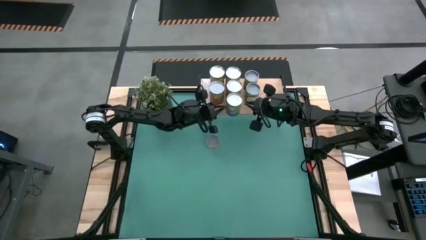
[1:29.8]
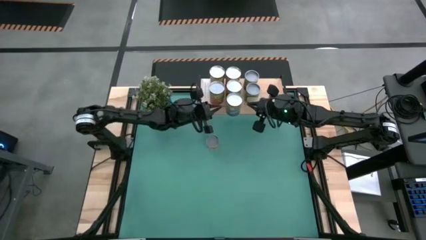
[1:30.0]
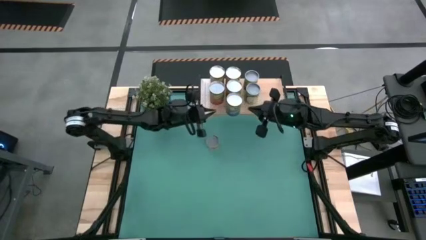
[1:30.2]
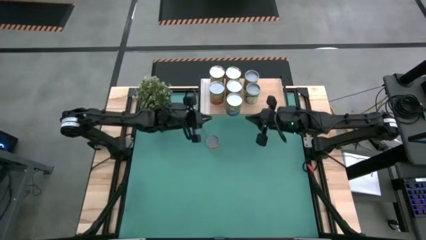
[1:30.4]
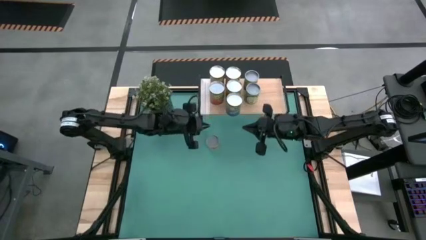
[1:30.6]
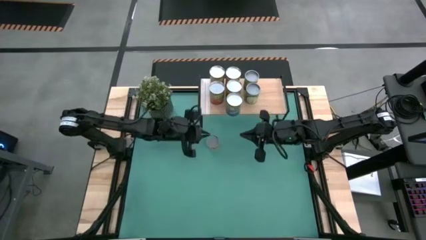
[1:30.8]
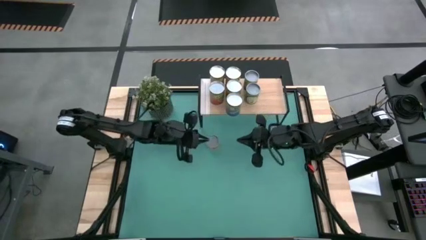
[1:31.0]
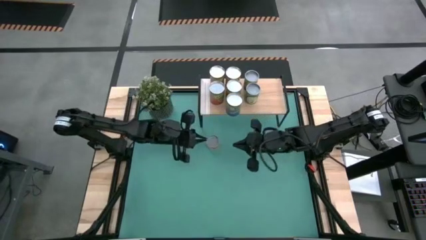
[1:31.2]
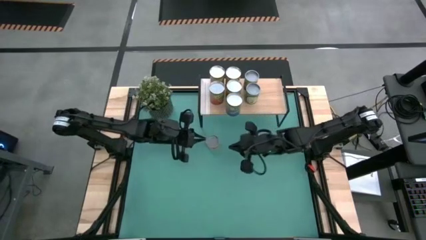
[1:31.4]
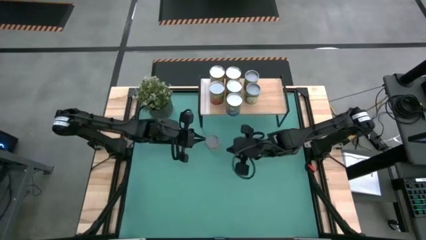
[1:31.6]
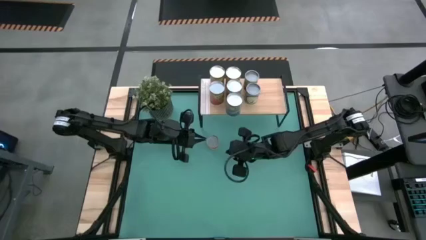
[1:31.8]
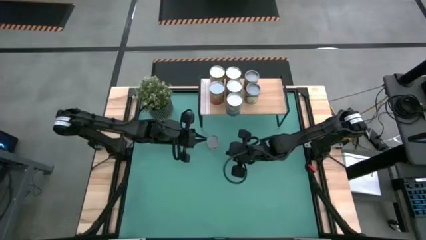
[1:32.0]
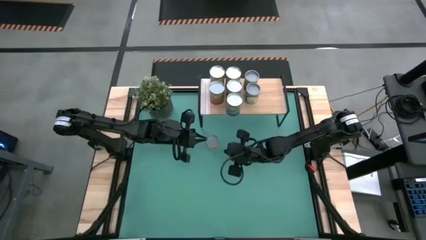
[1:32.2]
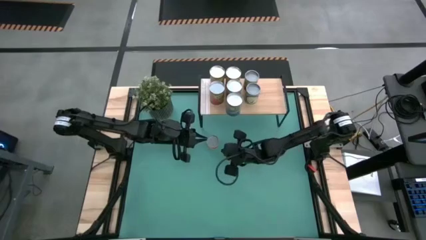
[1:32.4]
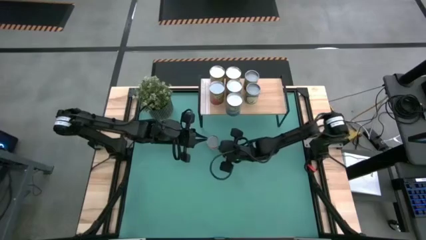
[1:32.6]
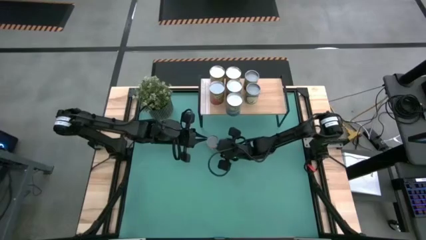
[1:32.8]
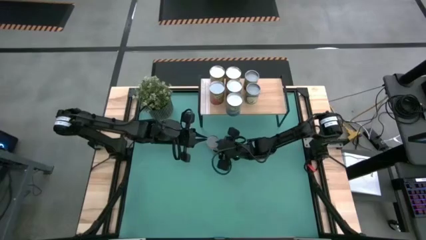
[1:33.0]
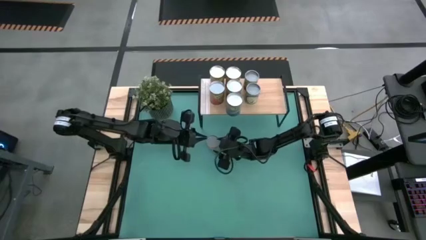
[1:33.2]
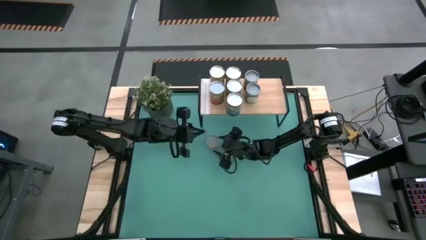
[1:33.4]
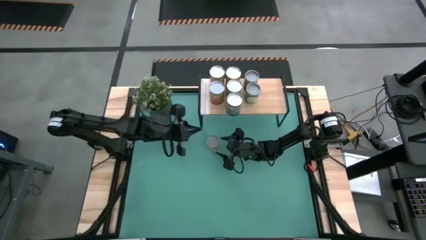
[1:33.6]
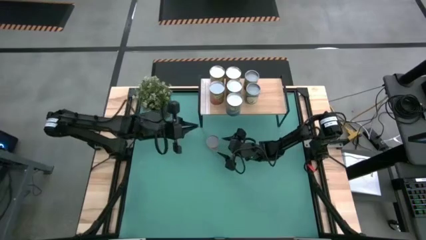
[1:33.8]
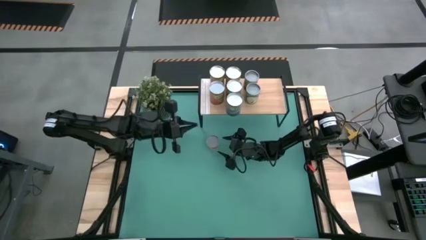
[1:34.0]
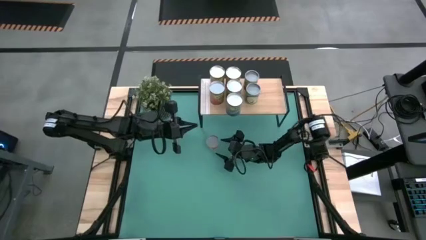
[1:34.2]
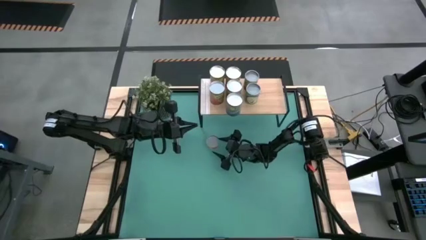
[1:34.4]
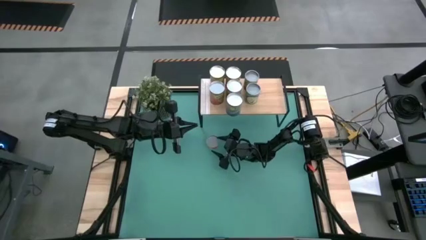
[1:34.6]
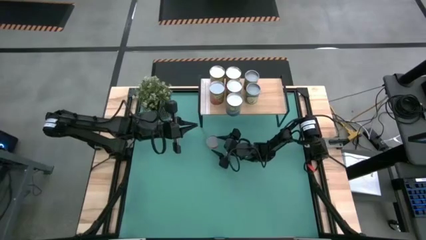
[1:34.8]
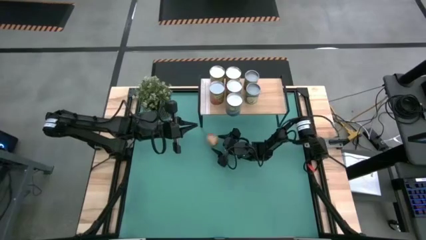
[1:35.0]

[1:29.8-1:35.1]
Task: Pick and place cans onto a shelf
Put the canned pineapple rings on the shelf

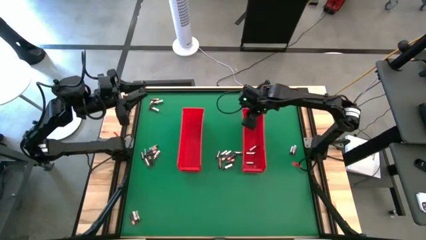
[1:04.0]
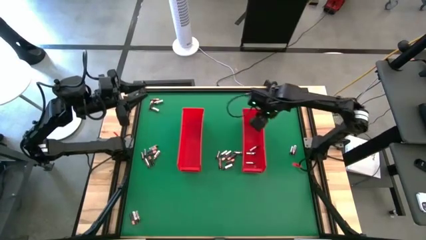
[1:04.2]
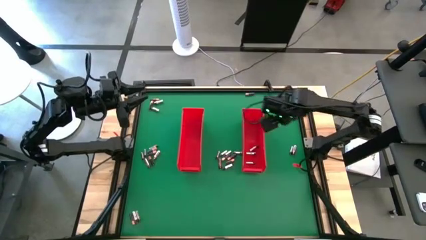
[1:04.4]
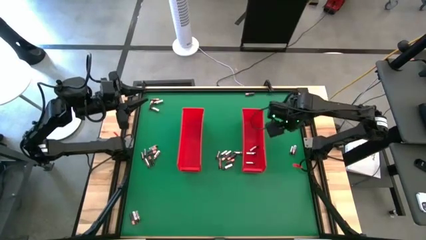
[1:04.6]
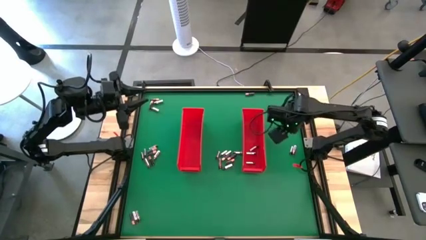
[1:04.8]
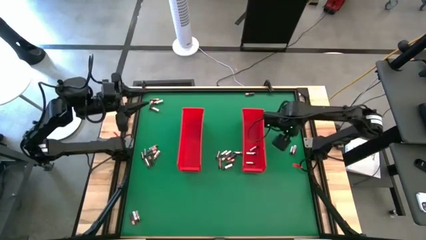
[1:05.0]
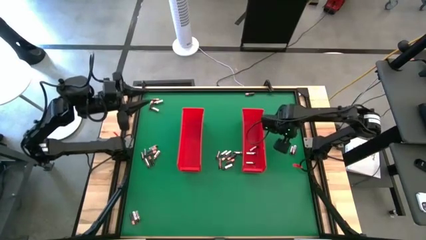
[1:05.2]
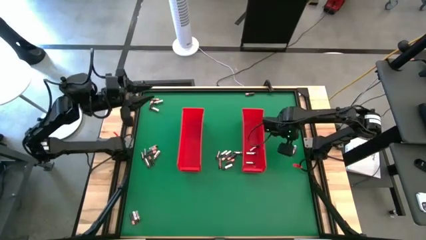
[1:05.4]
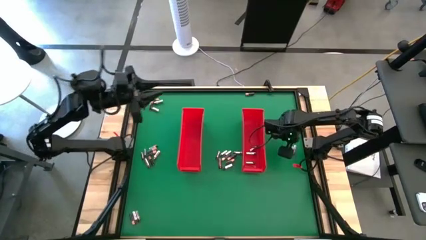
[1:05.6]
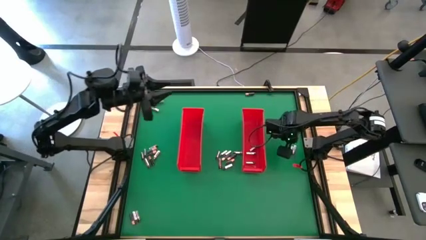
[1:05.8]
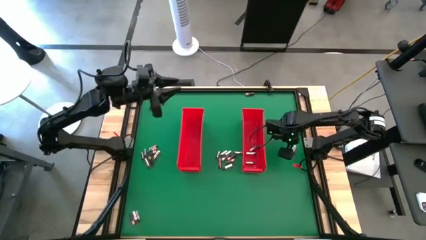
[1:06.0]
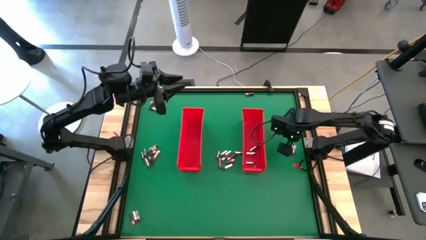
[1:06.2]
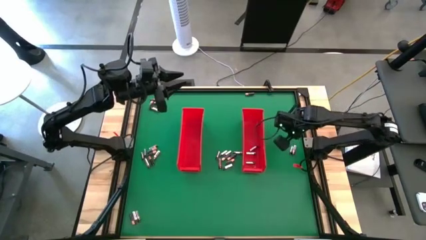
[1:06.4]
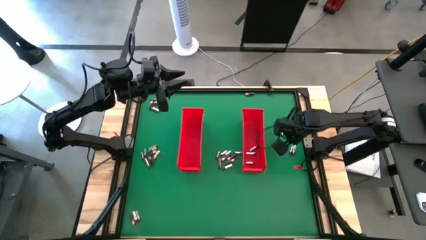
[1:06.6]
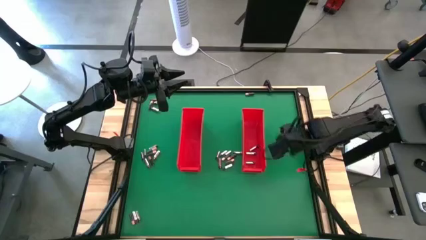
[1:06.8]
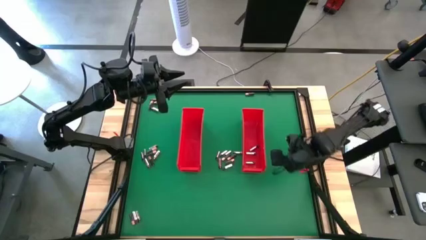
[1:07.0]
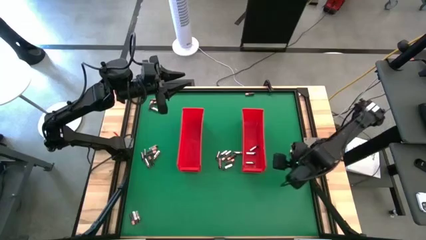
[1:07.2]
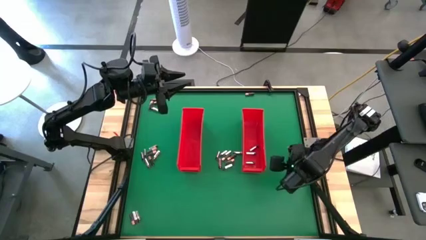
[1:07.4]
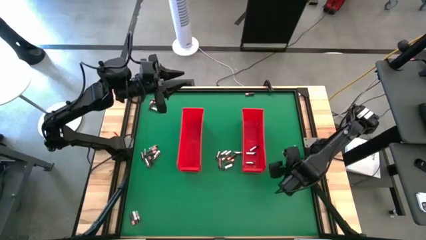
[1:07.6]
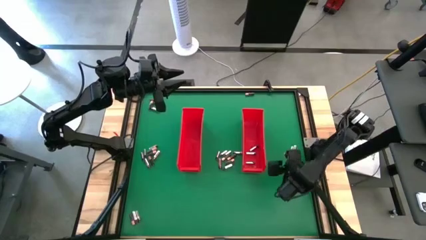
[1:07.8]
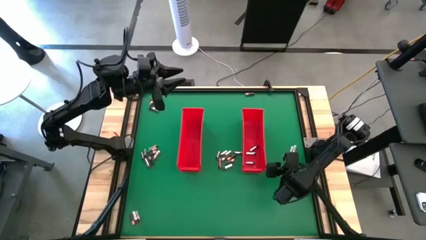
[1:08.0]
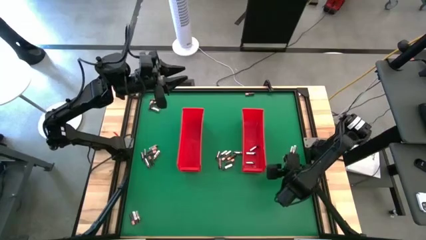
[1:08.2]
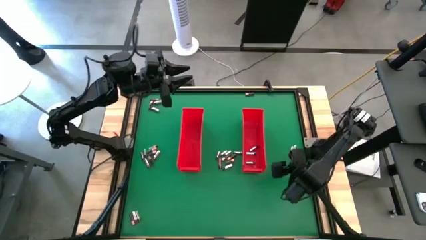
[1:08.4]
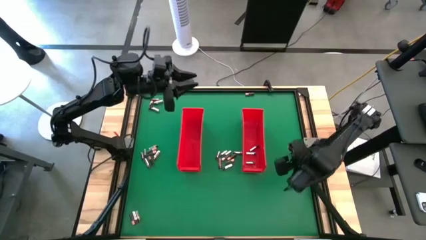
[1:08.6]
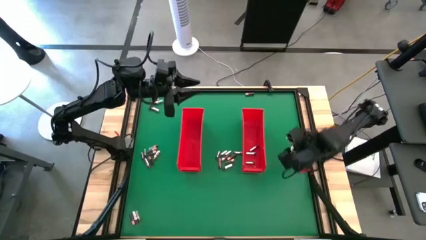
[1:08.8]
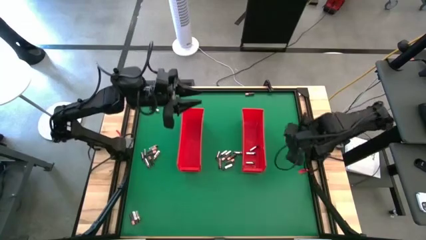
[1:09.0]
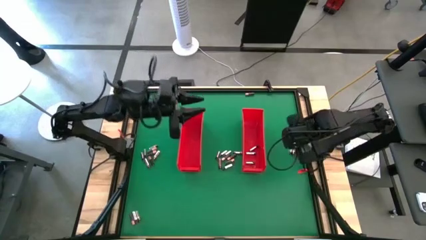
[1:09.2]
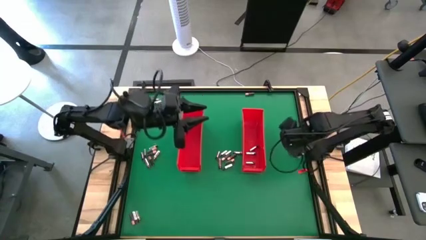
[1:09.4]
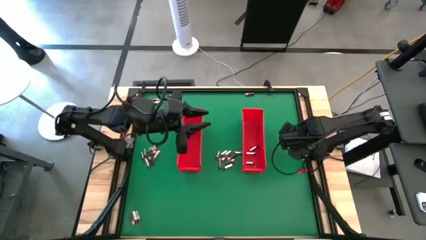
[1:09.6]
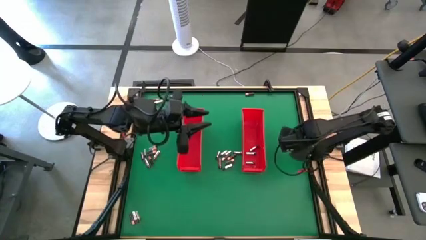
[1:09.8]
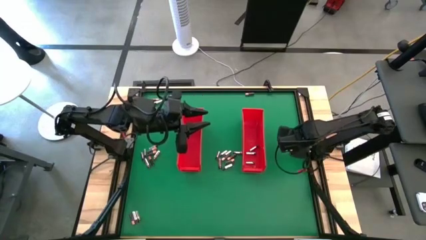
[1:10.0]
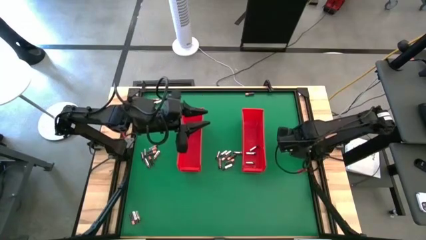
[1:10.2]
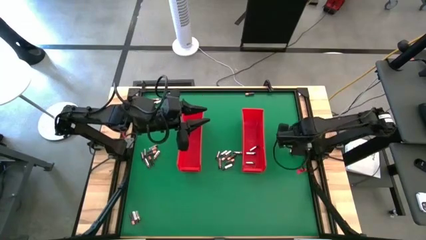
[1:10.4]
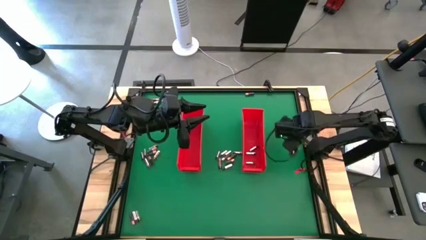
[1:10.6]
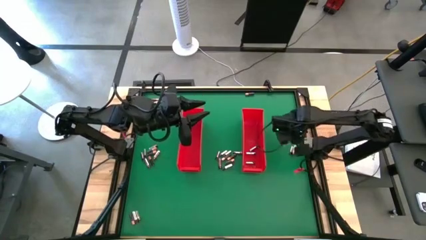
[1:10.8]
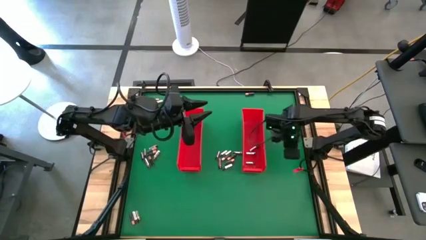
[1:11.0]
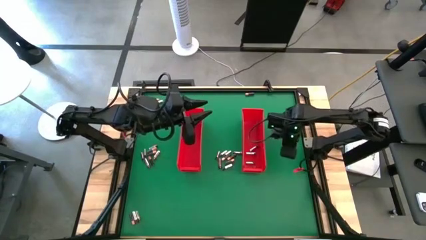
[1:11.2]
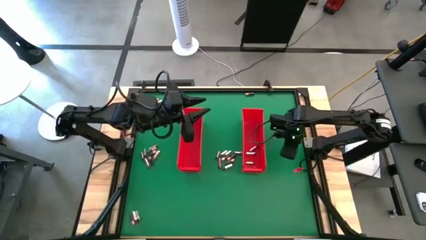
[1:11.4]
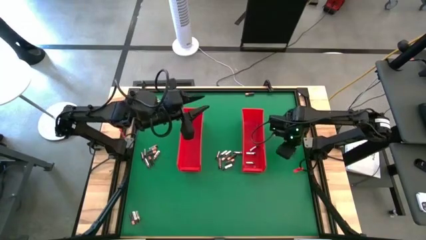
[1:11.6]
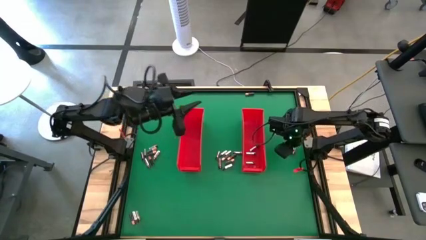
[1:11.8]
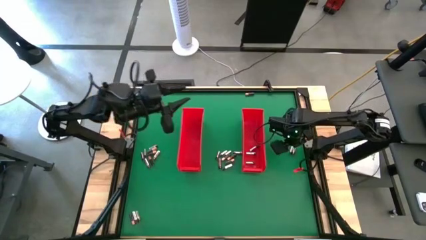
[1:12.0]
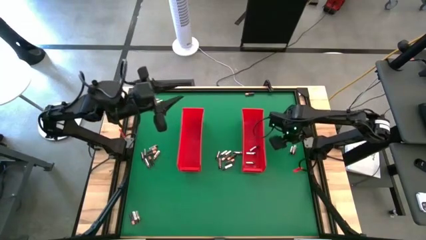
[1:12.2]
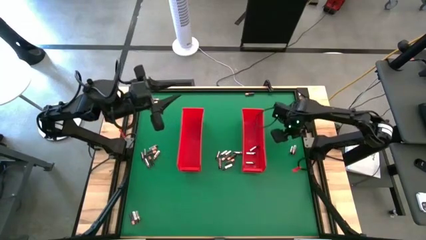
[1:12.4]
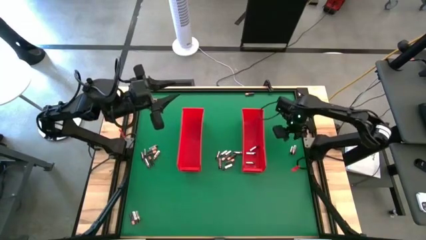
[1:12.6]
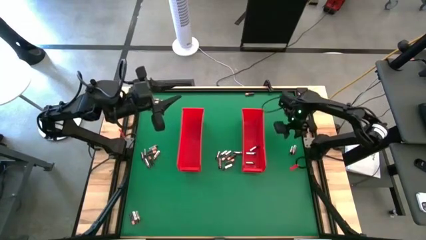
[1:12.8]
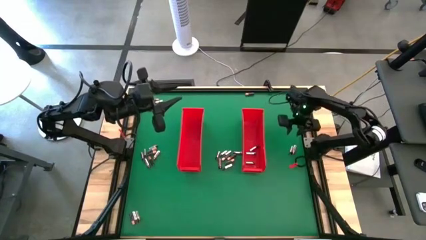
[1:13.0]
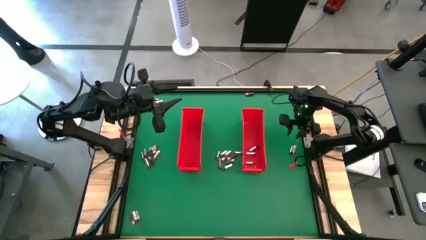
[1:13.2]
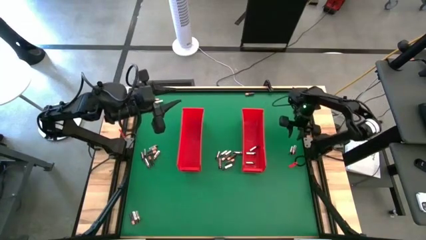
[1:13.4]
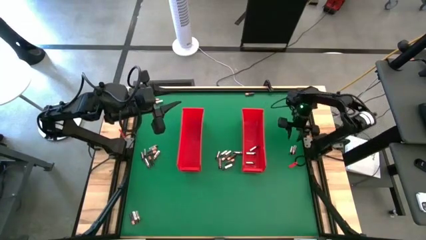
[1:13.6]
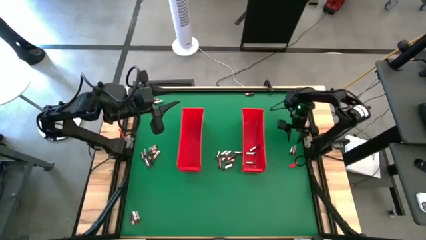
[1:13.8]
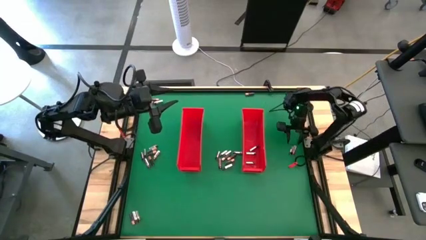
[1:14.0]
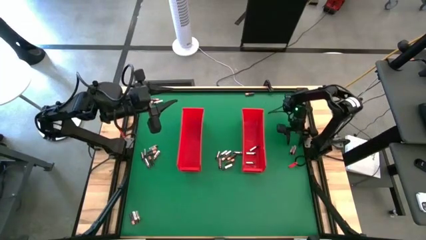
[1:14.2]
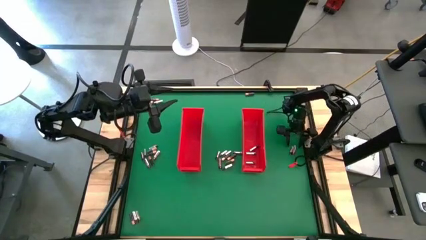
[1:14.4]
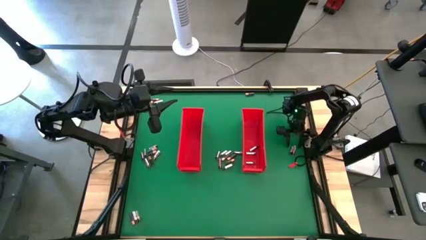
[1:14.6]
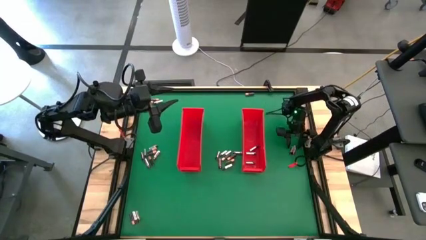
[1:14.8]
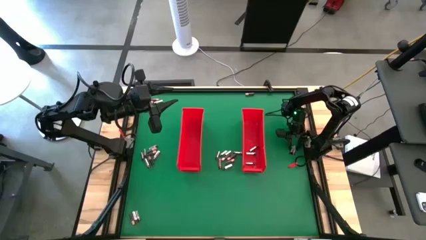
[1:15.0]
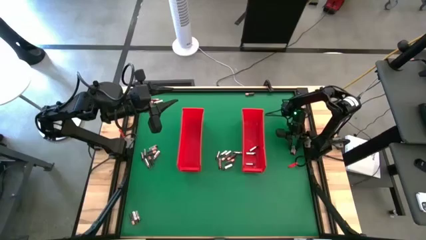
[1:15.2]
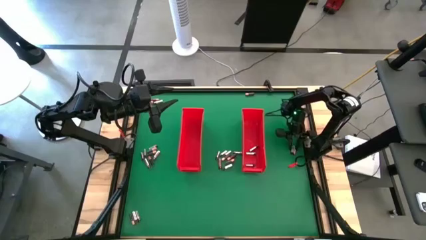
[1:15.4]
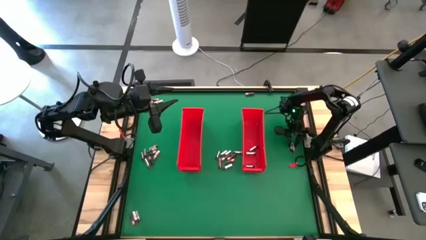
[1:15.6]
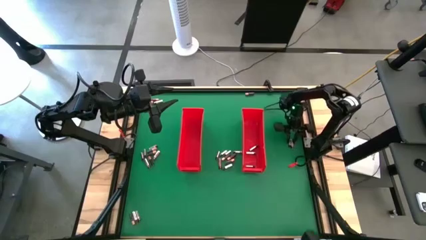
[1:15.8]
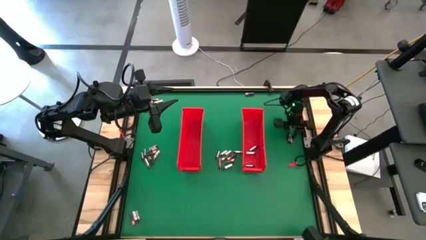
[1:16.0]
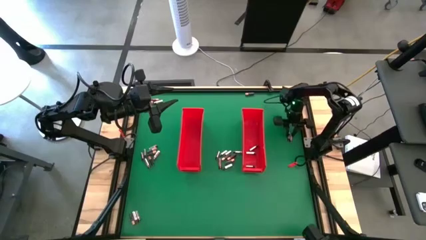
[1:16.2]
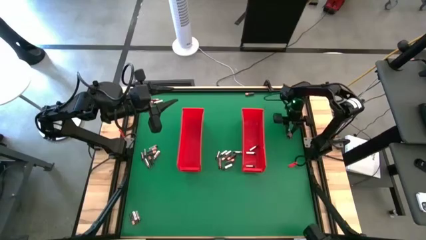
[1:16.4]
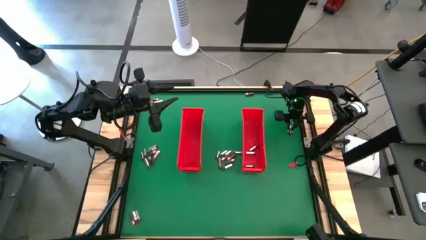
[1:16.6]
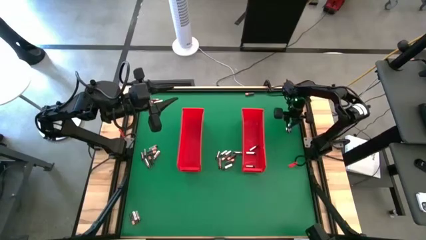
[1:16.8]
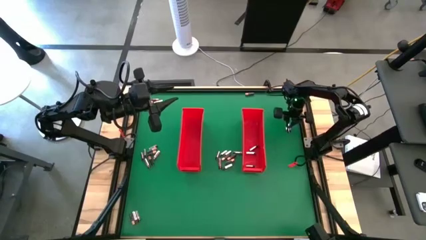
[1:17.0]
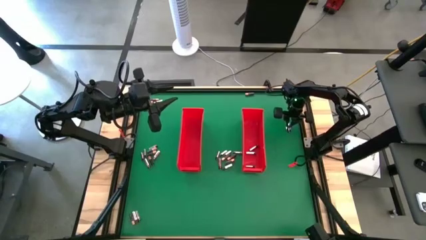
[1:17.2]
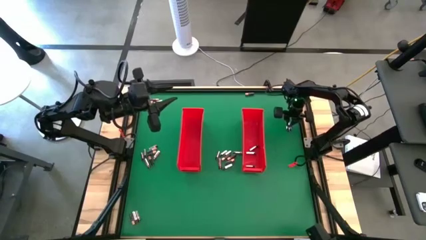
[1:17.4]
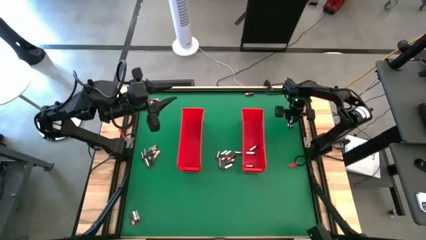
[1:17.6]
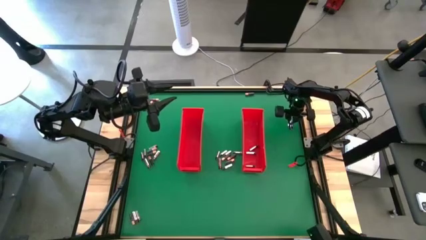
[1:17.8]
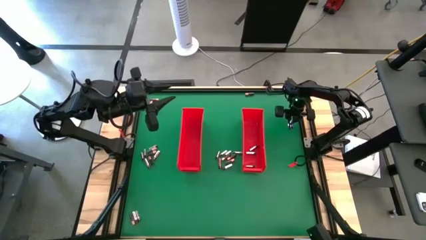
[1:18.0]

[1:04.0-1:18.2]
Task: Sort batteries
Put the silver battery into the right red bin
